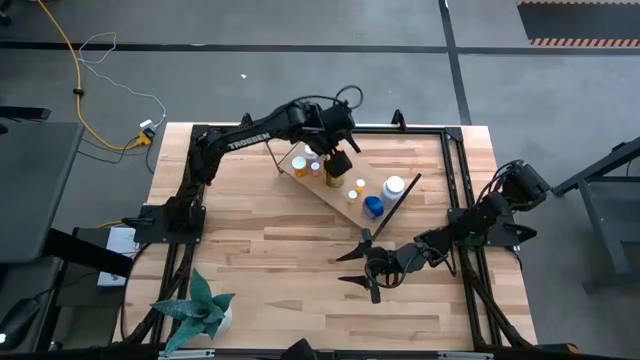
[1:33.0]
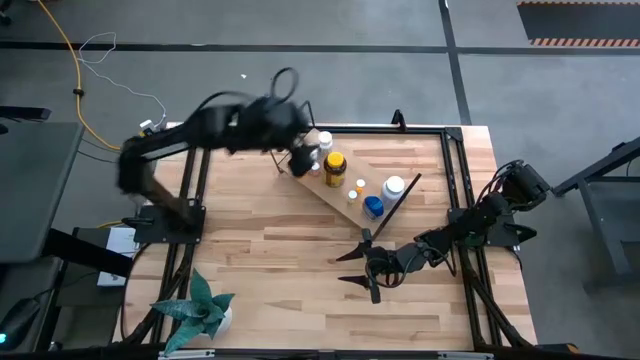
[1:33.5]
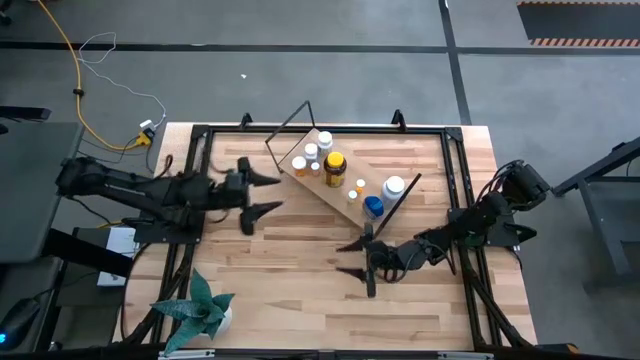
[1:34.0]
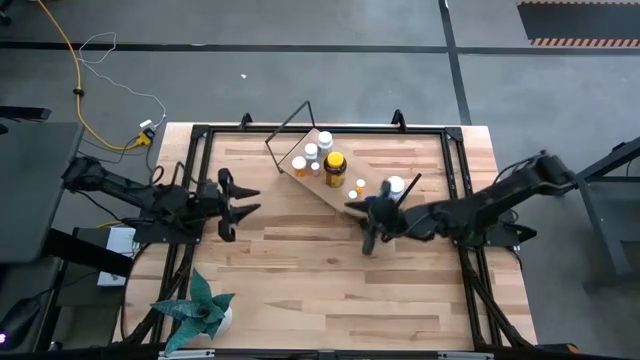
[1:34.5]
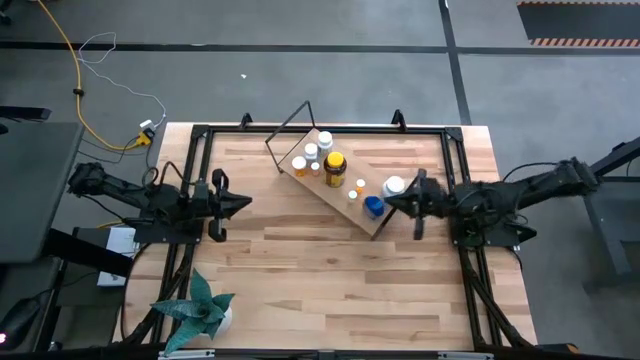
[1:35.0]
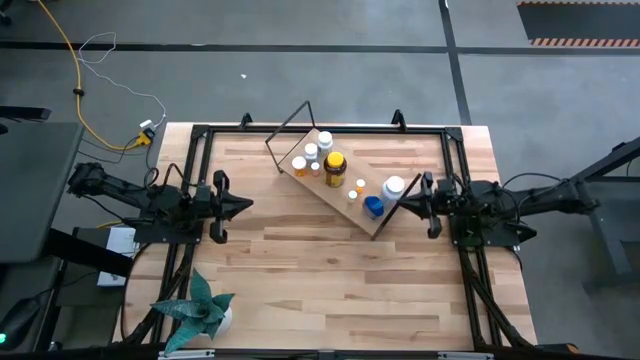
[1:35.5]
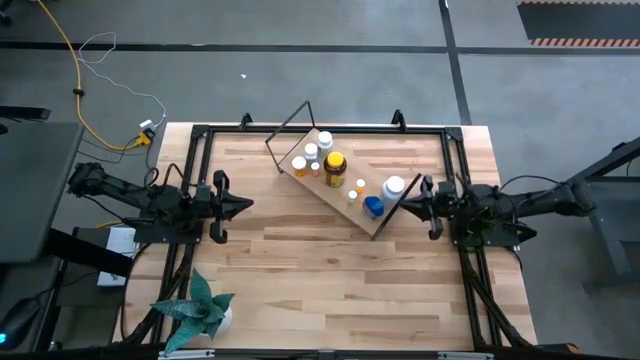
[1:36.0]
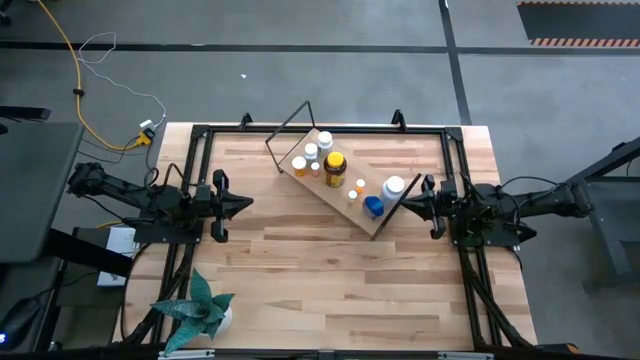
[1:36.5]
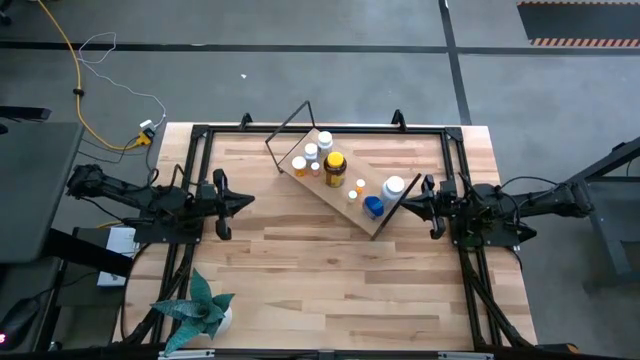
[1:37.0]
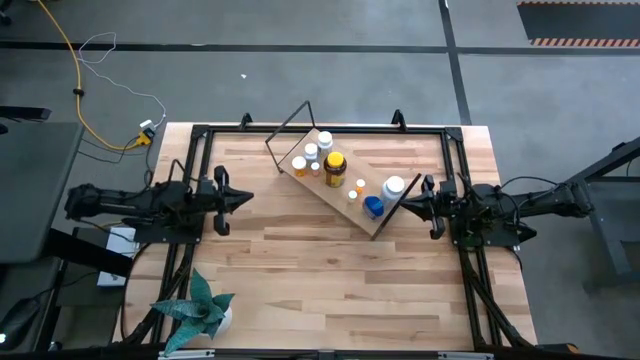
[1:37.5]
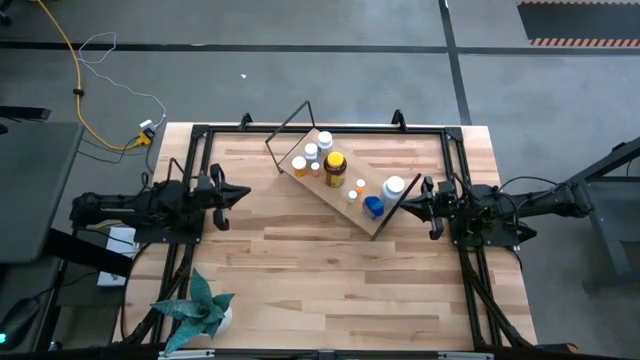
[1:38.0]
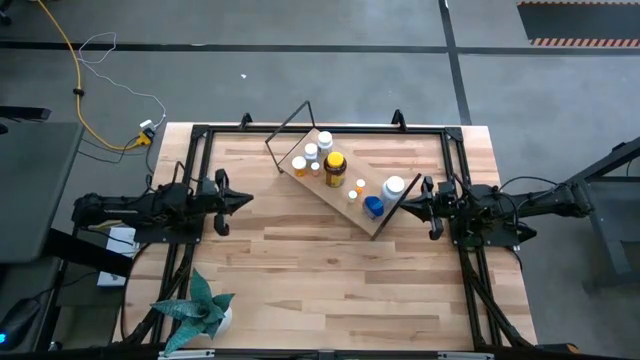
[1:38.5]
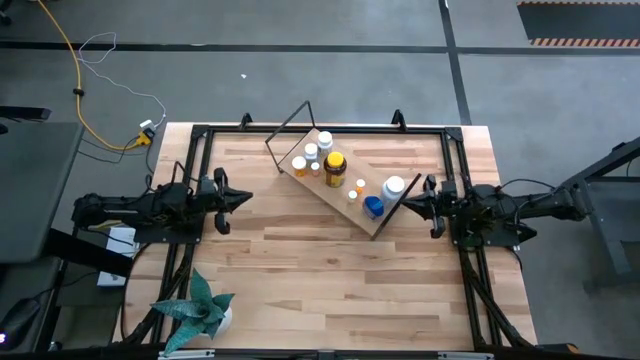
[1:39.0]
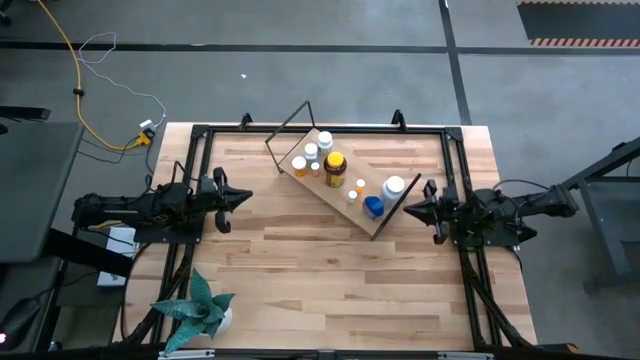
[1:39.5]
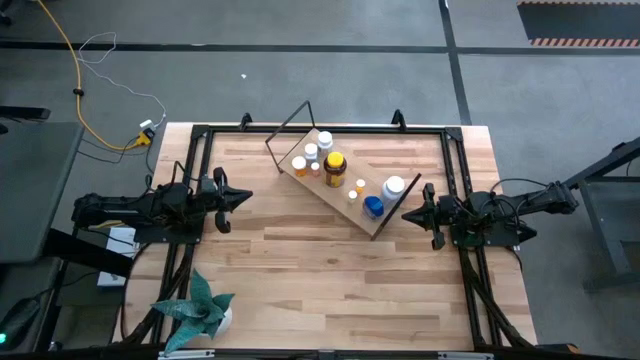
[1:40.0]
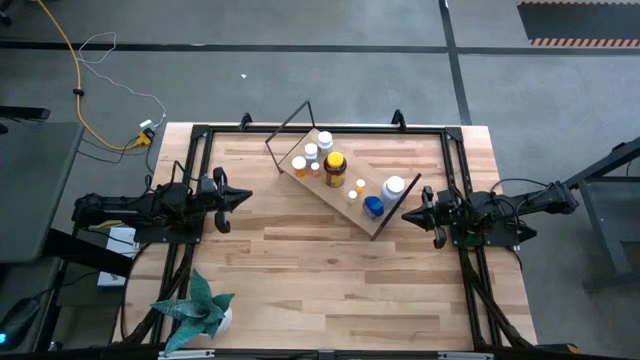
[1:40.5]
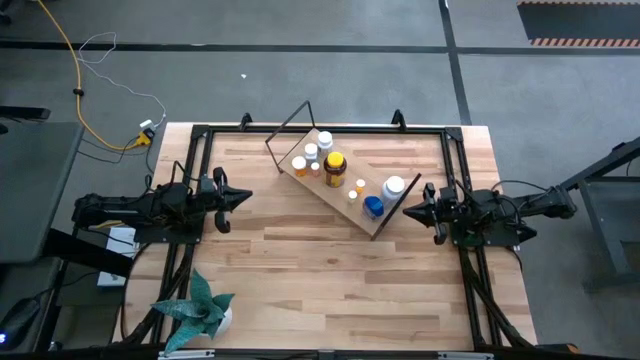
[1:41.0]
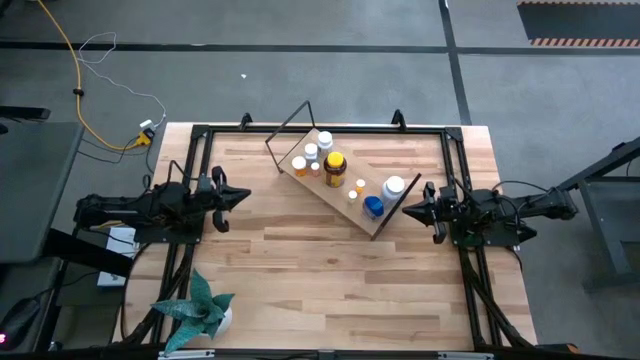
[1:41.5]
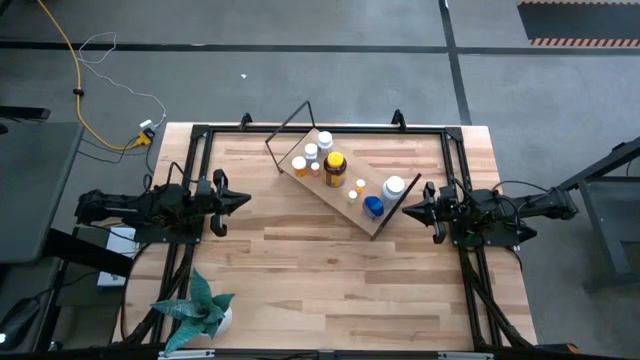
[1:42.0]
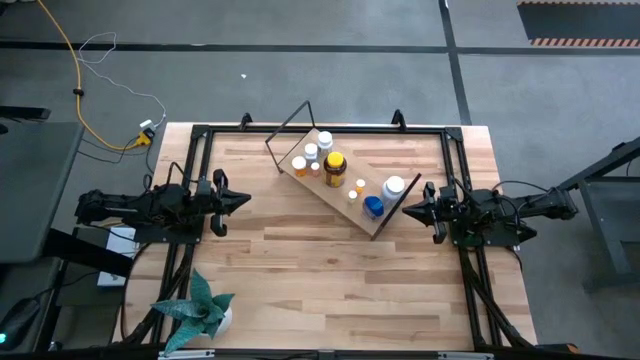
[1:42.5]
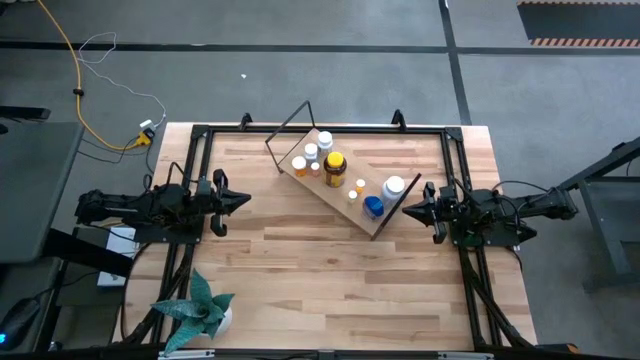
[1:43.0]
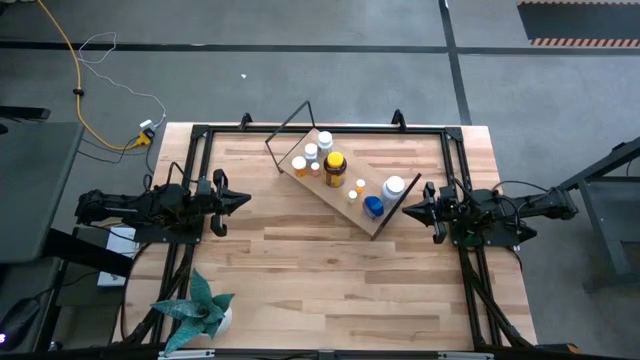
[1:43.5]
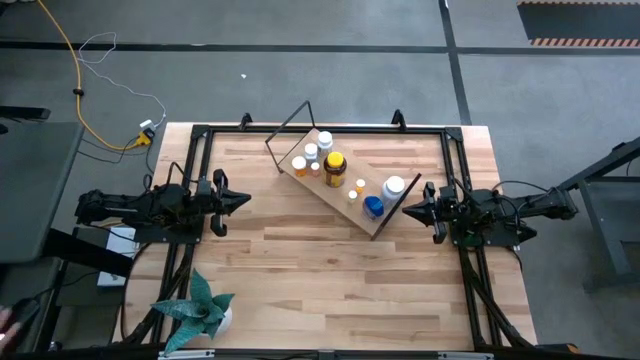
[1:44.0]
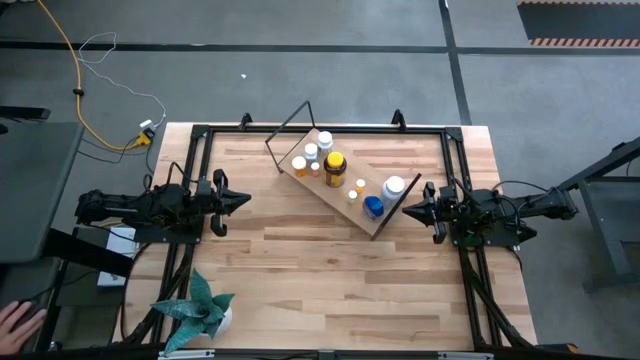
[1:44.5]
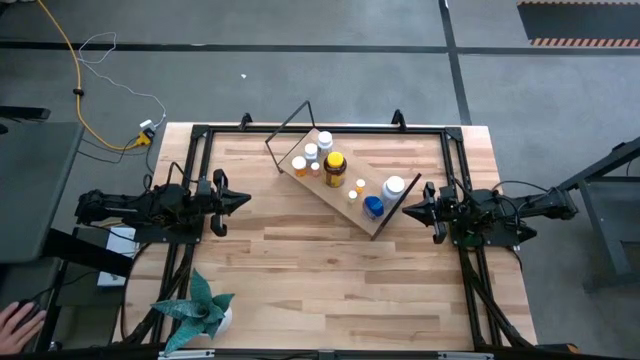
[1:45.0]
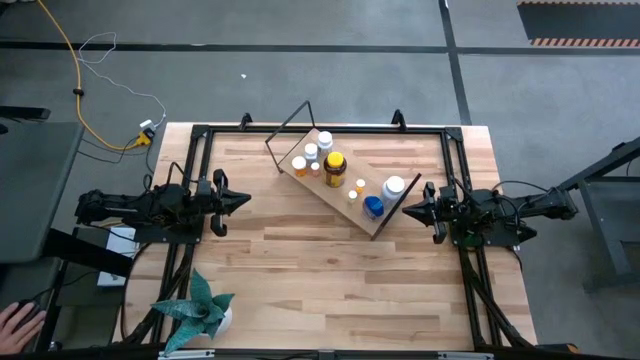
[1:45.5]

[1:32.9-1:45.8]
Task: Pick and place medicine bottles onto shelf by color
Return to Home Position

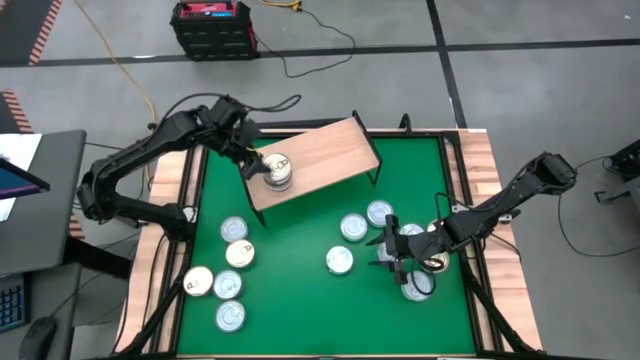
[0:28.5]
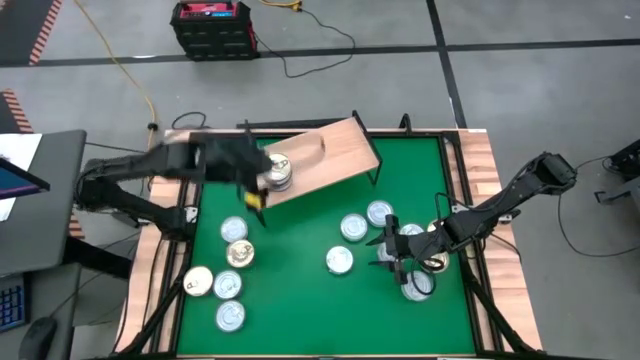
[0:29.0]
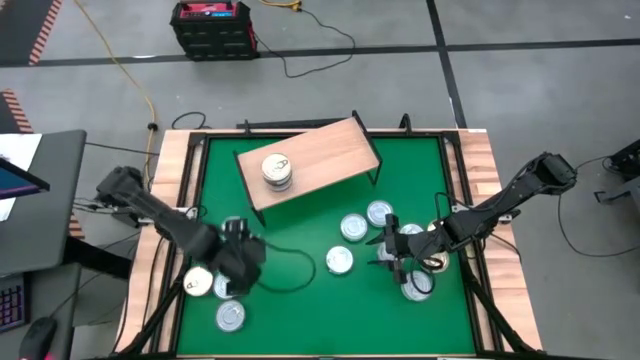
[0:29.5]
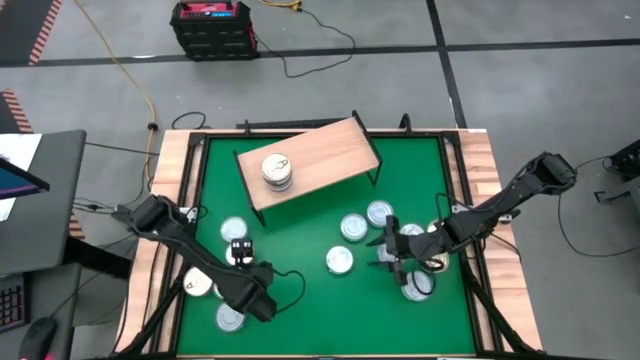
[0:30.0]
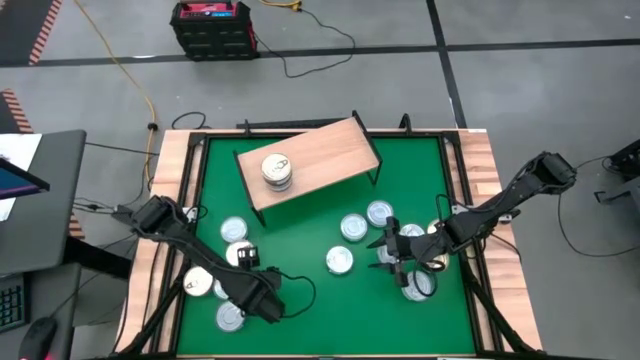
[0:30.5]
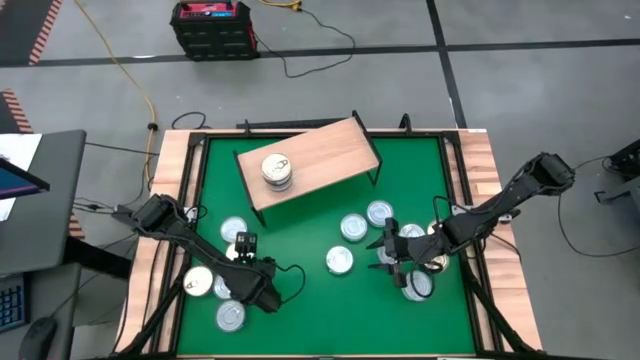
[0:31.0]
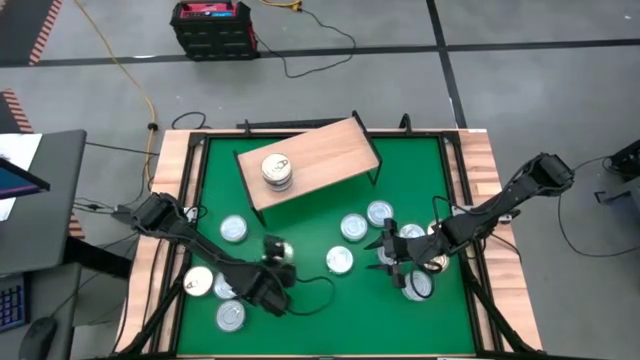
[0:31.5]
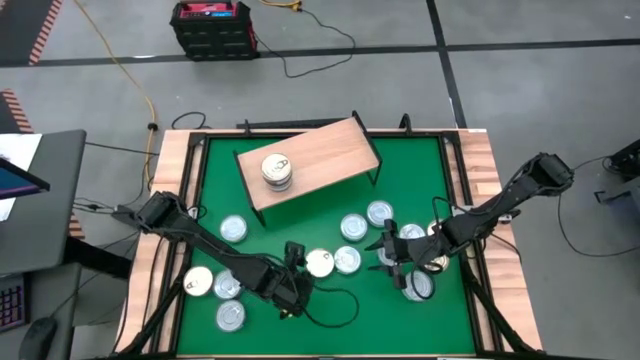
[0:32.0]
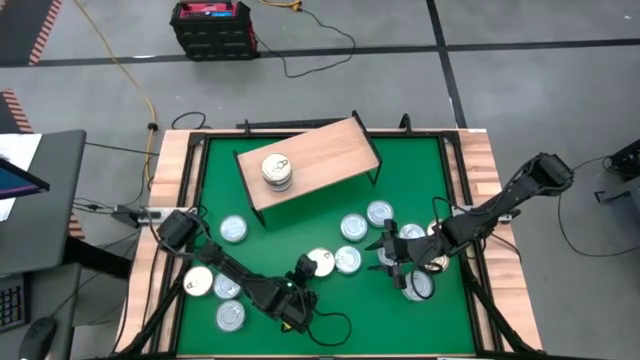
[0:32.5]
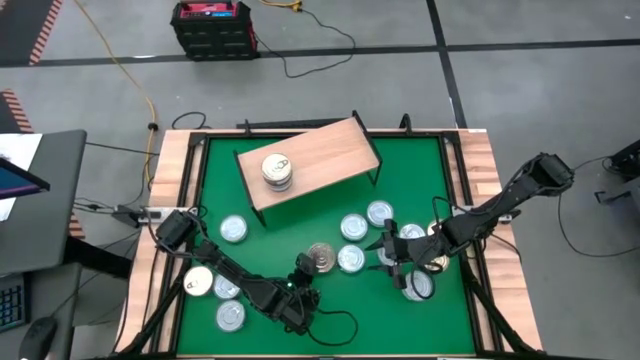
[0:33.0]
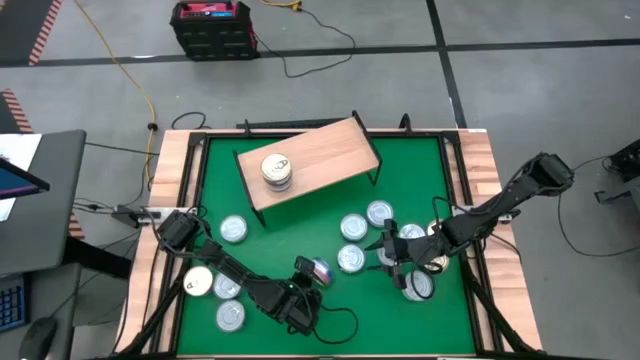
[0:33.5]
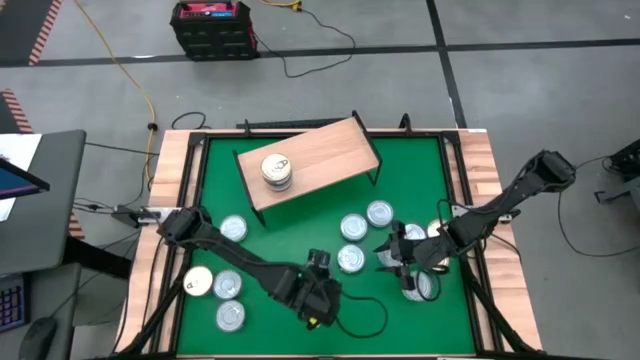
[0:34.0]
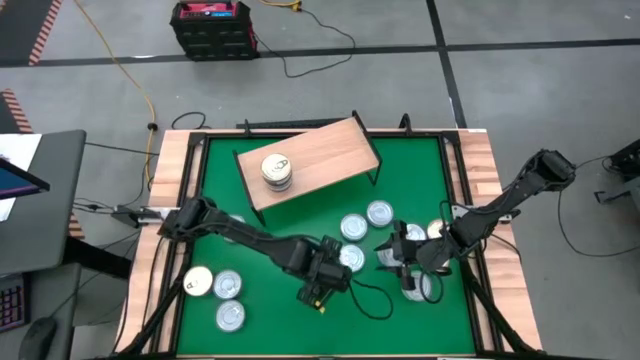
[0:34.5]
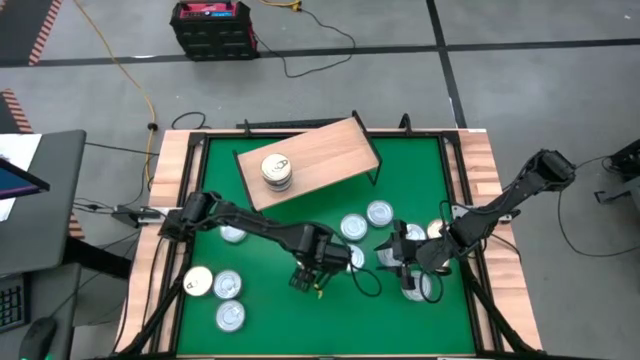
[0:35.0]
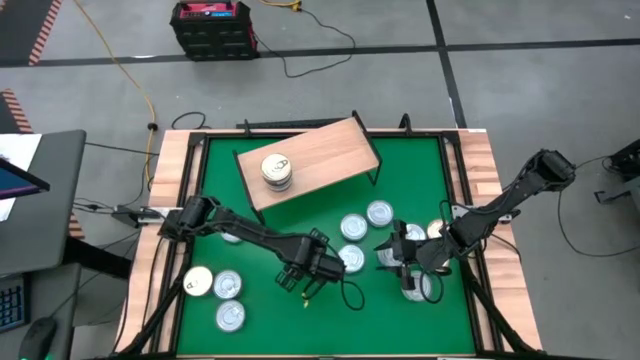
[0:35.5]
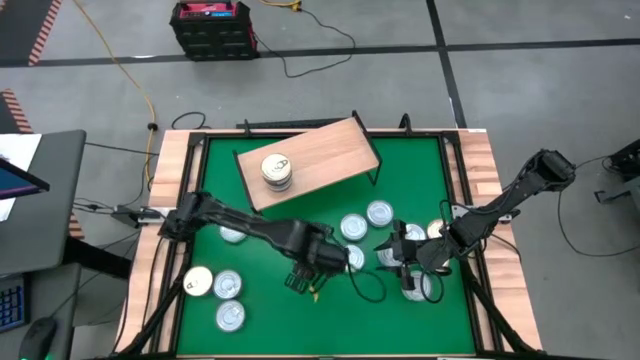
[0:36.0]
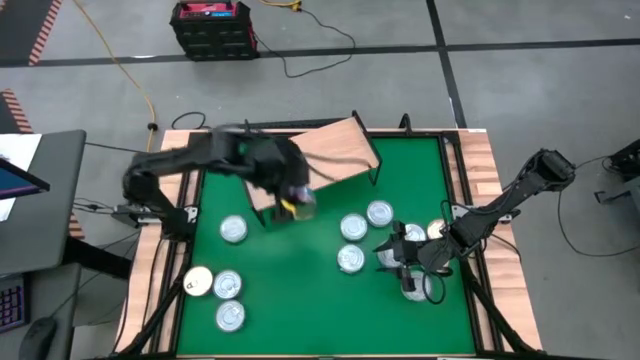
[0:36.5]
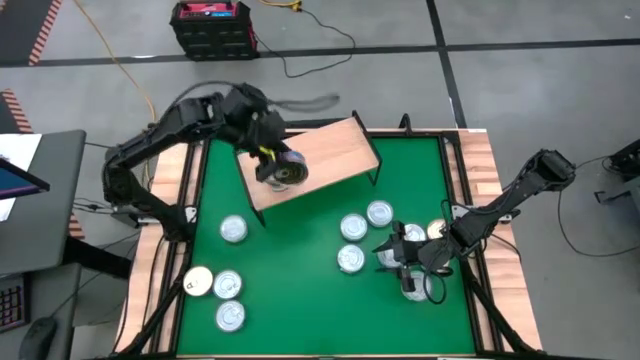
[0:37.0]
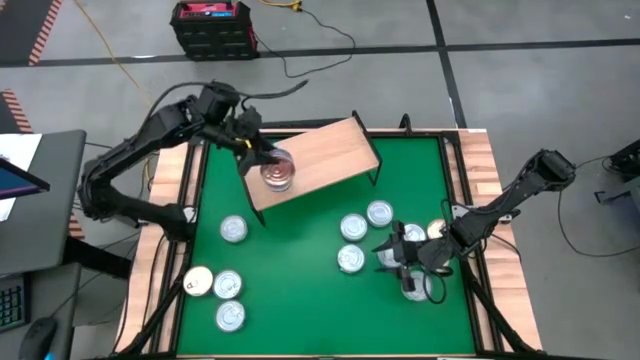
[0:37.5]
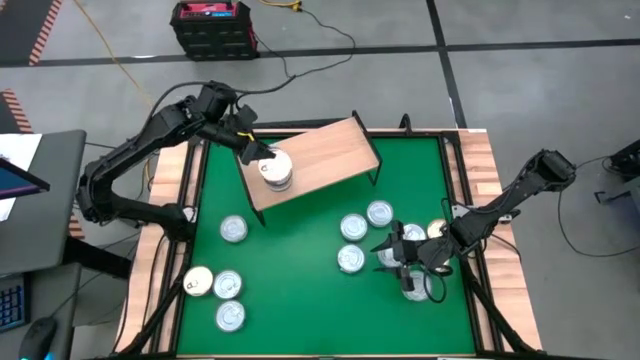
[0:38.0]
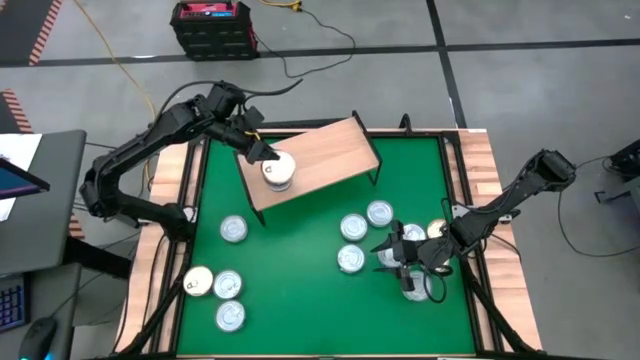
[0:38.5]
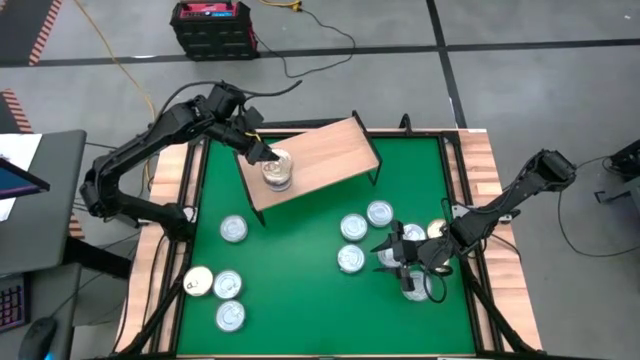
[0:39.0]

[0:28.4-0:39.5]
Task: Stack canned seafood by type on shelf
Stack the blue pink tuna can on top of the blue pink tuna can on the shelf
